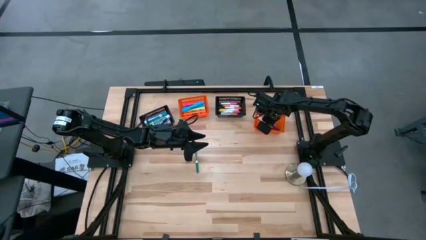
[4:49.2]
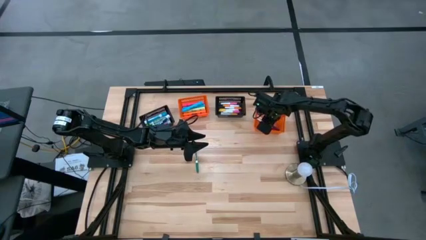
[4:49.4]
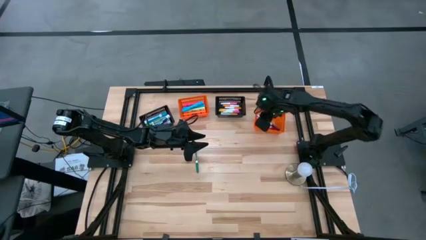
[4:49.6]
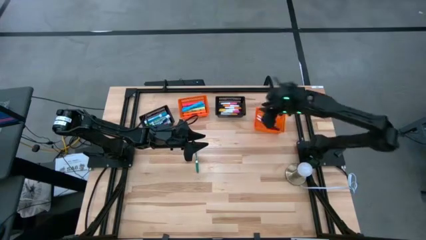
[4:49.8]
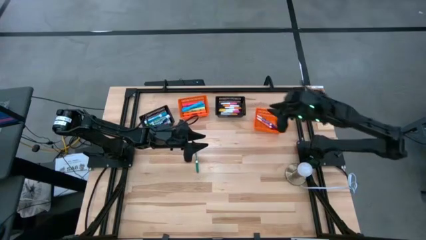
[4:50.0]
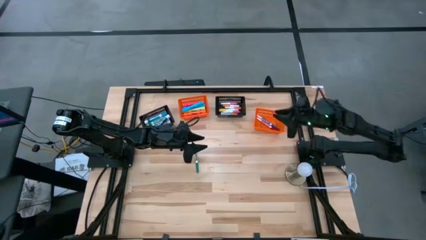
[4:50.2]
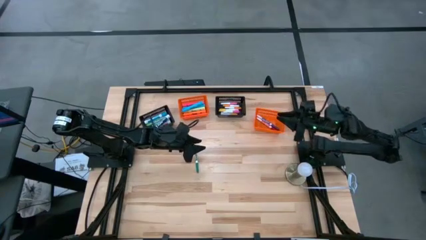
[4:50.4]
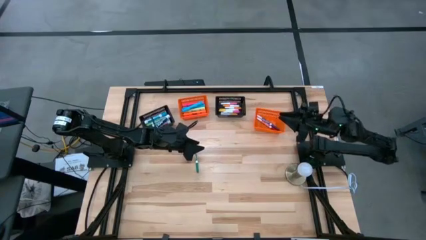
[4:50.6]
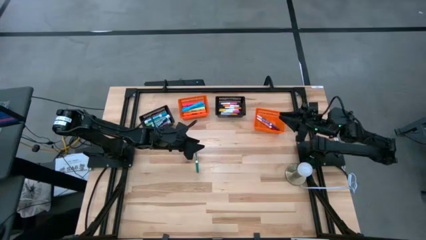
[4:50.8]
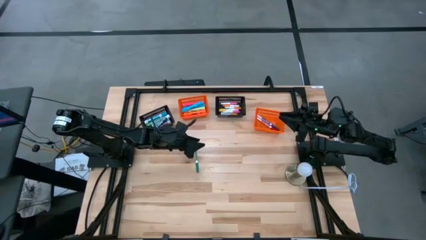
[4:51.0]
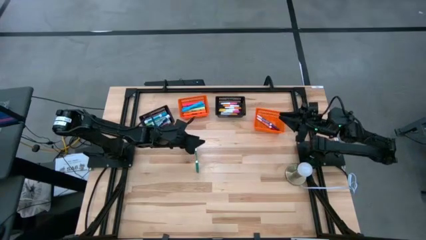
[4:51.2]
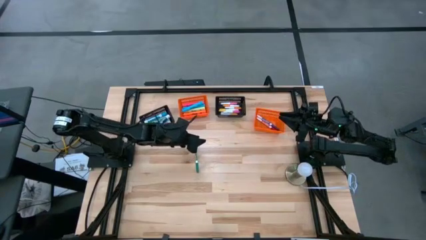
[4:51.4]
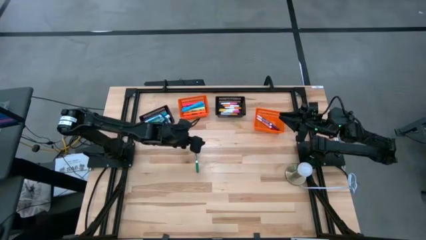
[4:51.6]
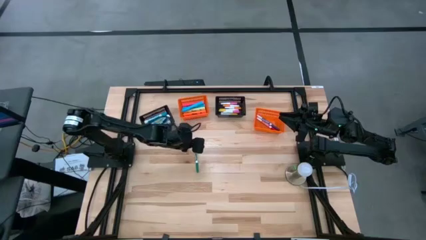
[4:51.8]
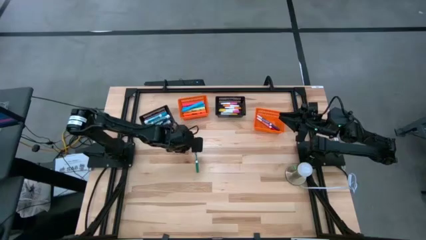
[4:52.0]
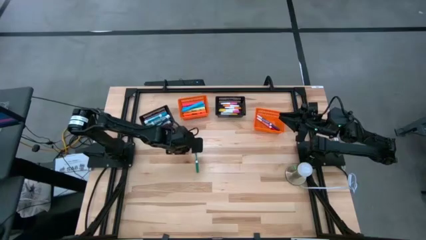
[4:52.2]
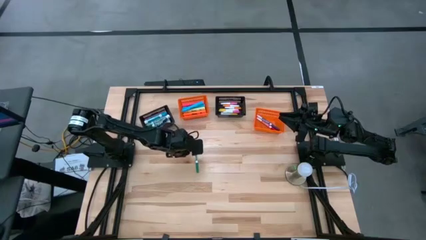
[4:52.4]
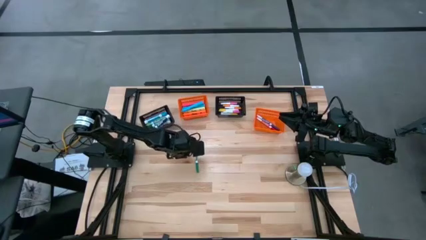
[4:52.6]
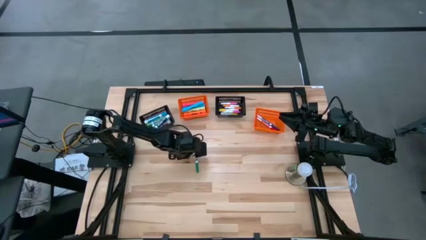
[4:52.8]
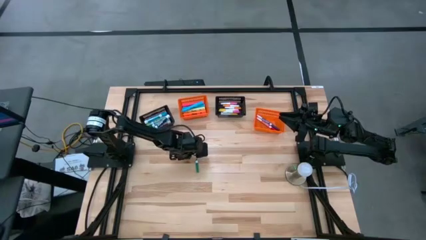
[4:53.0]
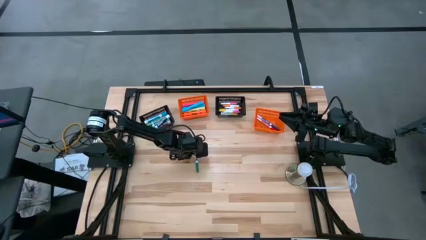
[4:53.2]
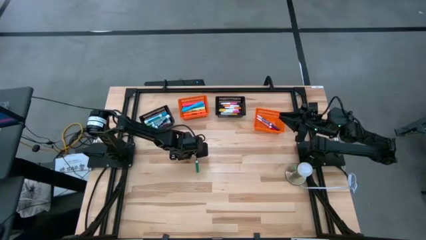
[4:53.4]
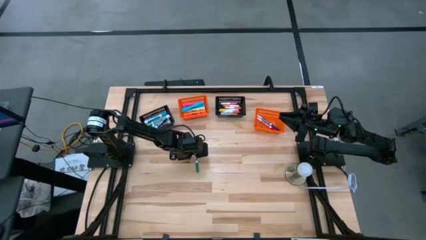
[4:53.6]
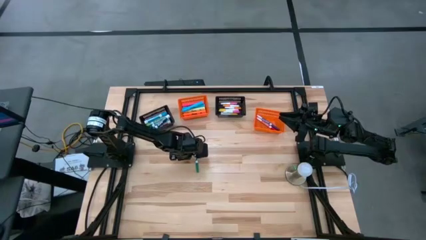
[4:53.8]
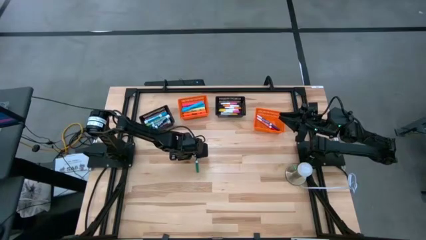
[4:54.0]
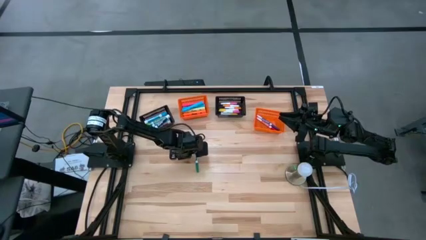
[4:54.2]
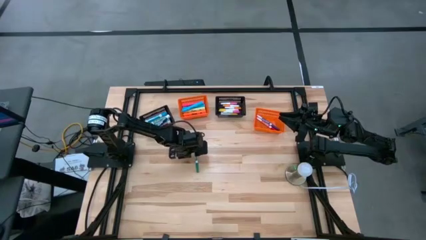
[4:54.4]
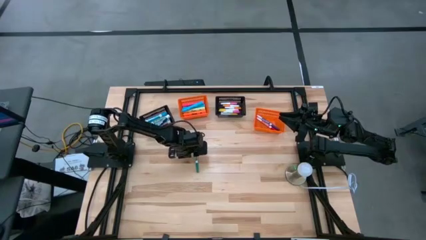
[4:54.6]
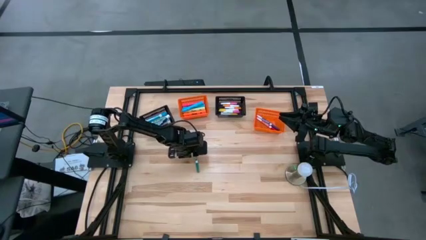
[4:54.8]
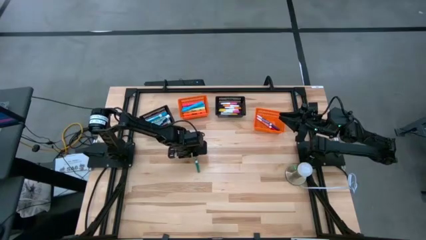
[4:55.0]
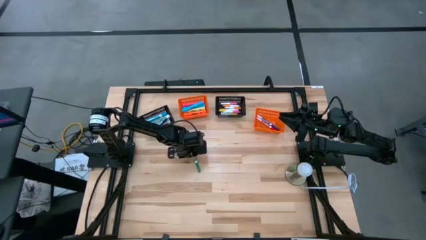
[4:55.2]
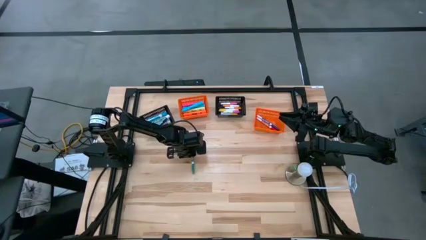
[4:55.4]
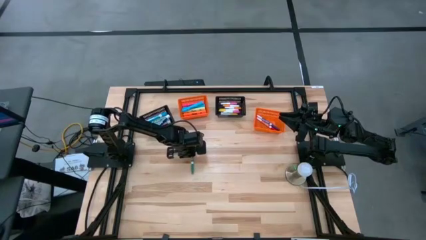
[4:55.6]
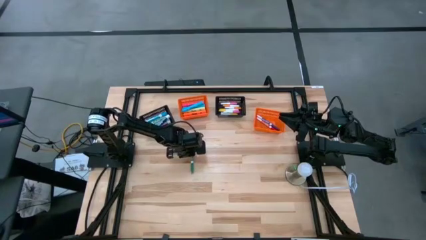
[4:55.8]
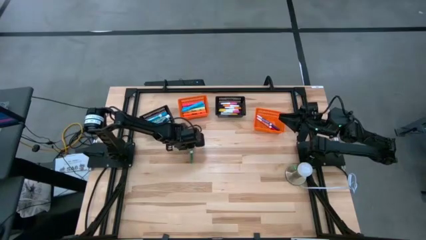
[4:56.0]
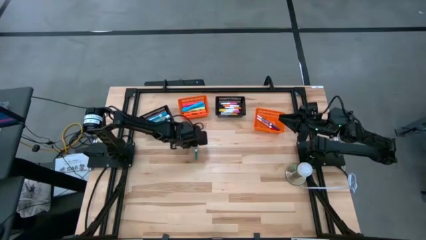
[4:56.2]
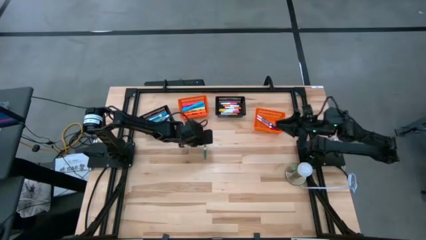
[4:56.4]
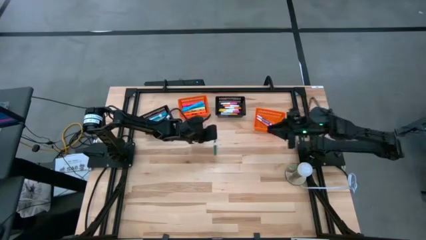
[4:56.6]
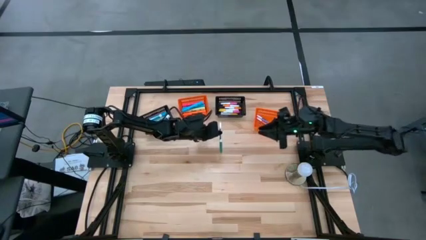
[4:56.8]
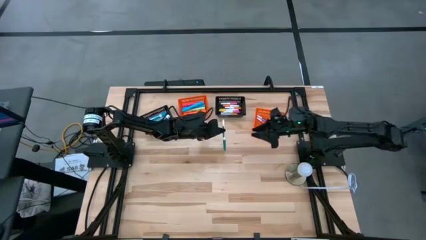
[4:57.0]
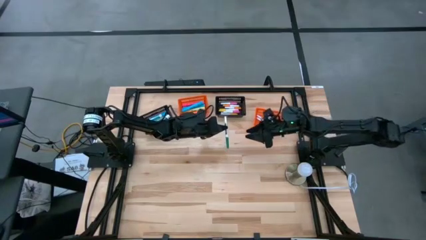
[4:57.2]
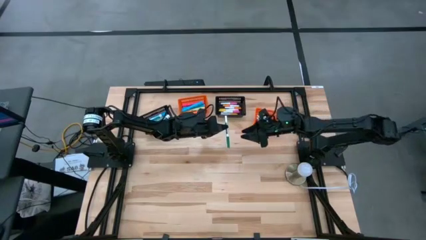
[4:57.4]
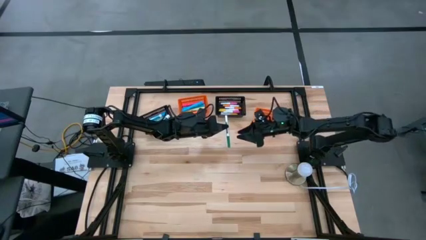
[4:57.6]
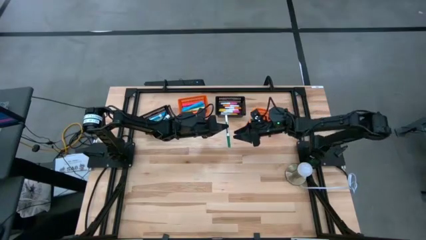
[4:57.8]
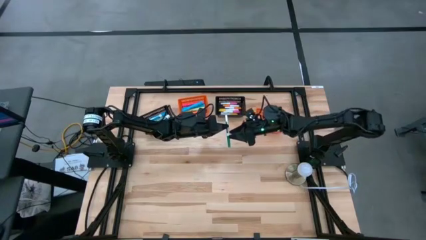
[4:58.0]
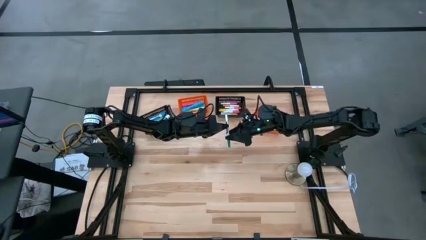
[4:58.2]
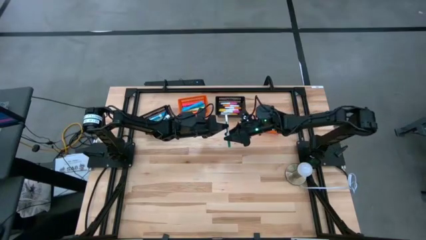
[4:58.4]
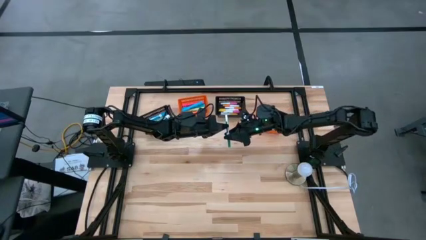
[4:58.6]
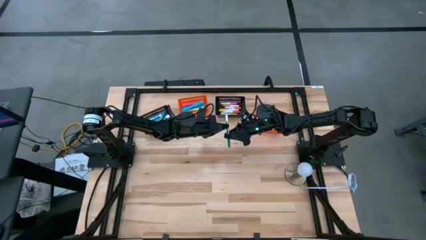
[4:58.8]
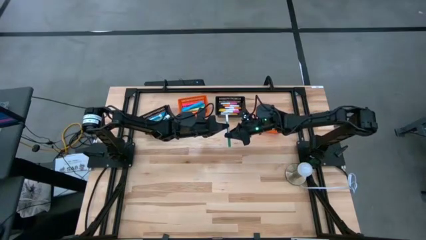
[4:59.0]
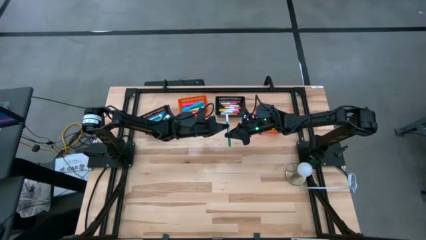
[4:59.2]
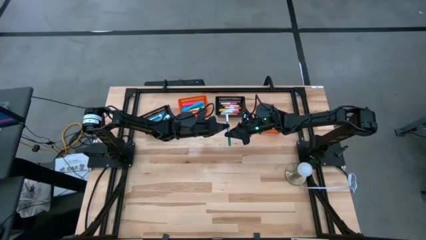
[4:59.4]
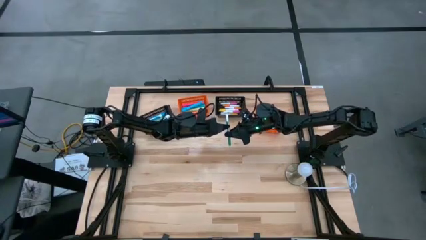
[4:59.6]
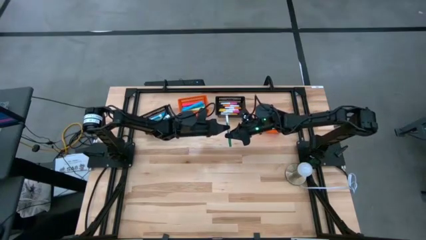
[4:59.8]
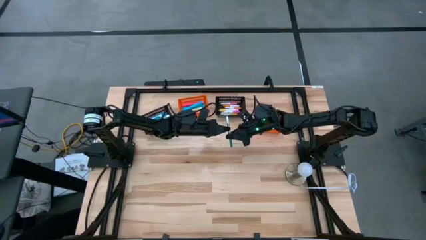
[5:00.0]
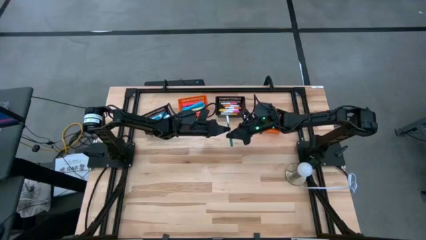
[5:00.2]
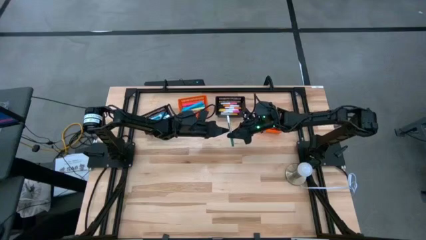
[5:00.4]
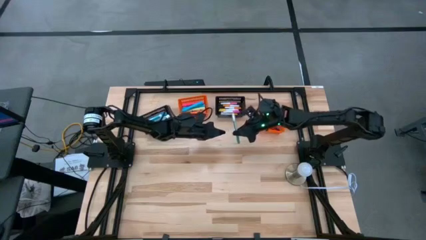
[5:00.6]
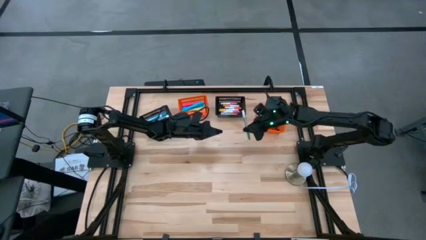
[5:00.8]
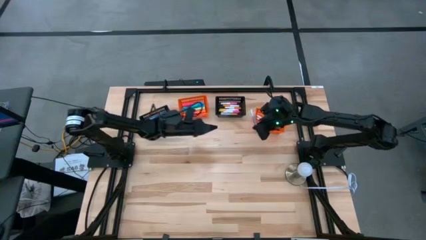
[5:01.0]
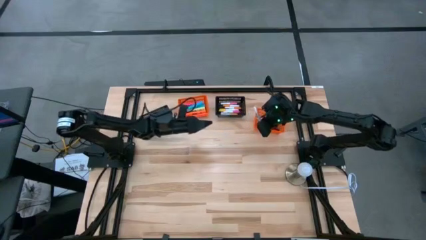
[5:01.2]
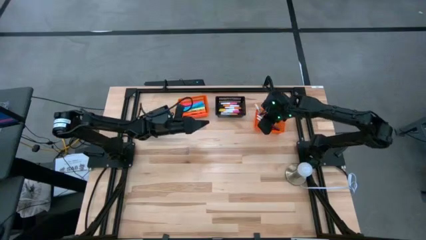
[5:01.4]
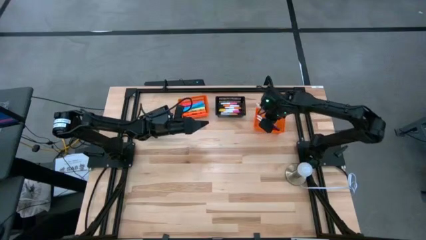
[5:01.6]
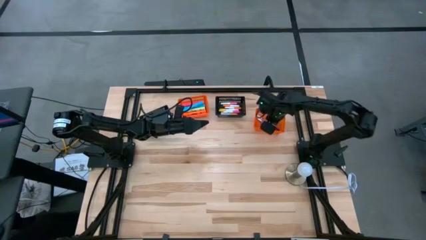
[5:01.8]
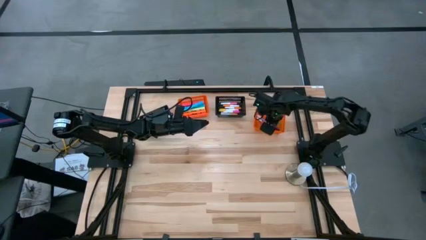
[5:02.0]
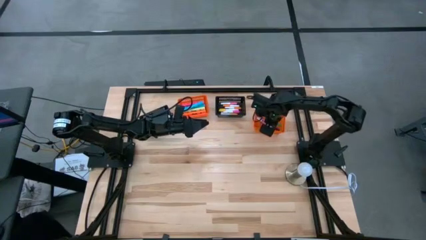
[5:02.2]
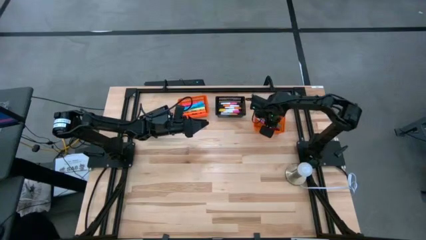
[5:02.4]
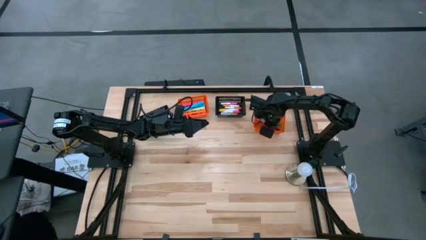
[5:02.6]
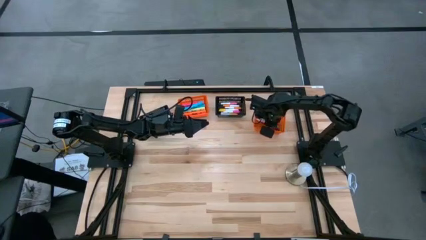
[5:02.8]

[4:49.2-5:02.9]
Task: Pick & Place Markers
Put the small green marker pen into the right orange bin

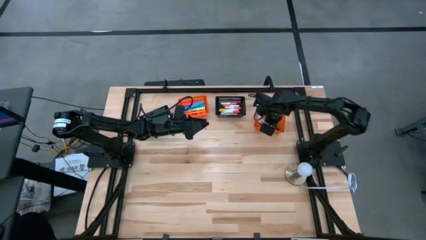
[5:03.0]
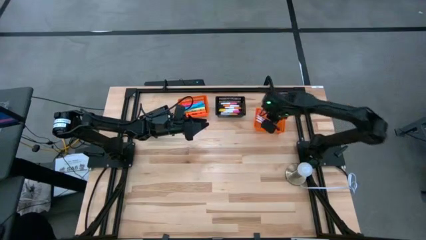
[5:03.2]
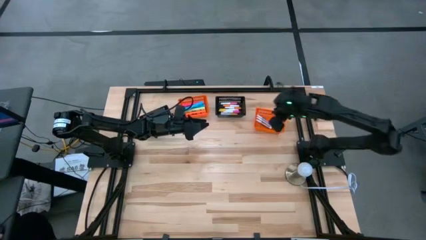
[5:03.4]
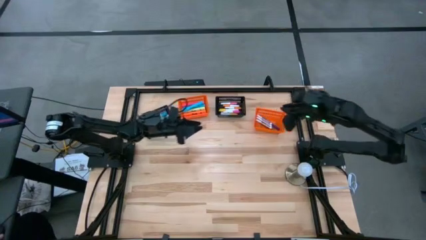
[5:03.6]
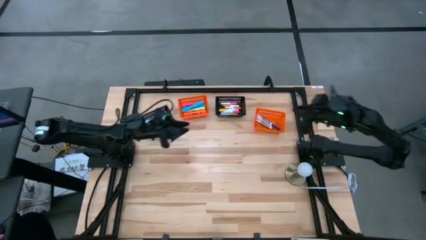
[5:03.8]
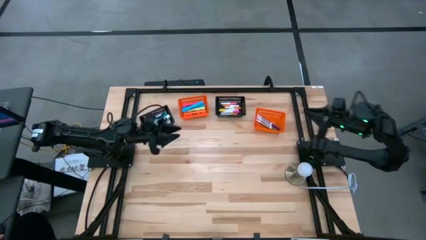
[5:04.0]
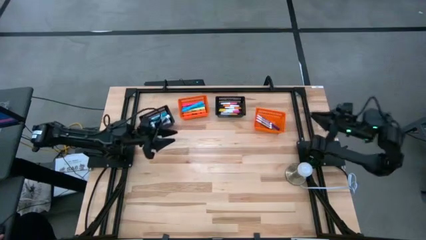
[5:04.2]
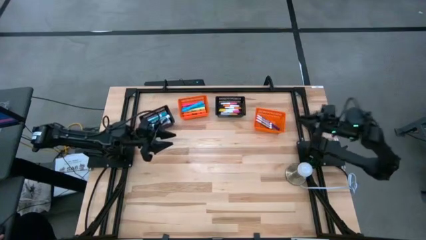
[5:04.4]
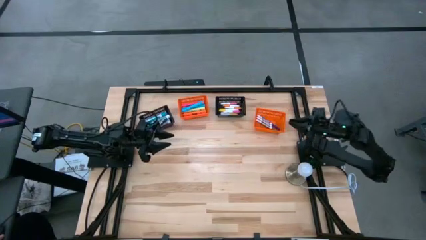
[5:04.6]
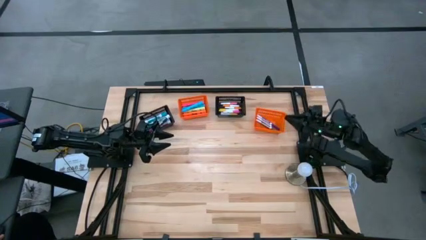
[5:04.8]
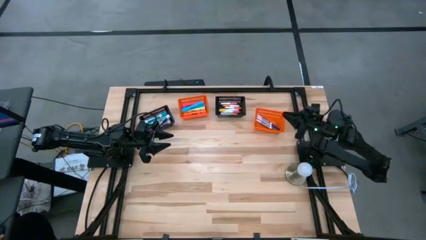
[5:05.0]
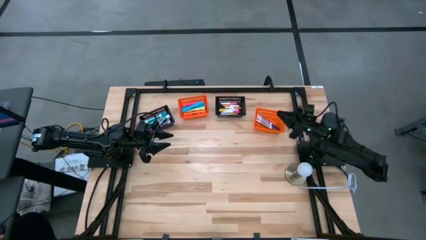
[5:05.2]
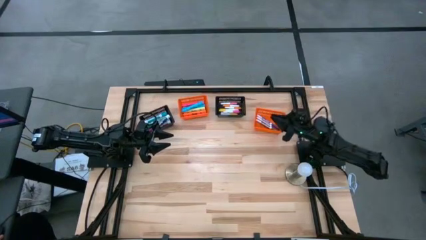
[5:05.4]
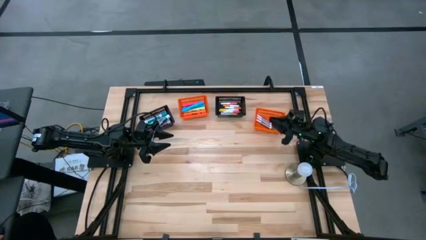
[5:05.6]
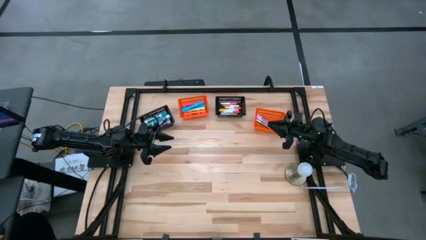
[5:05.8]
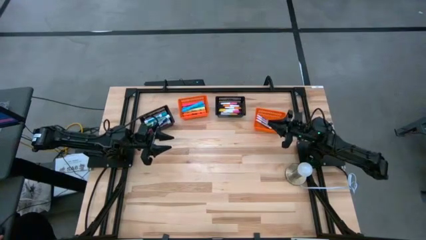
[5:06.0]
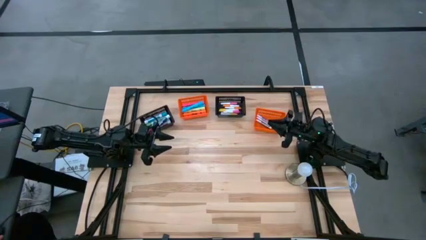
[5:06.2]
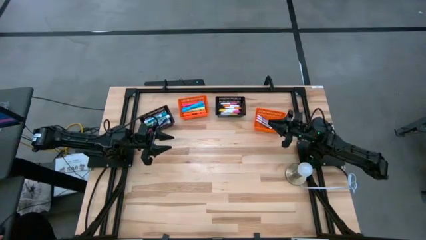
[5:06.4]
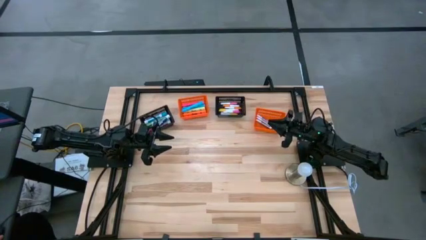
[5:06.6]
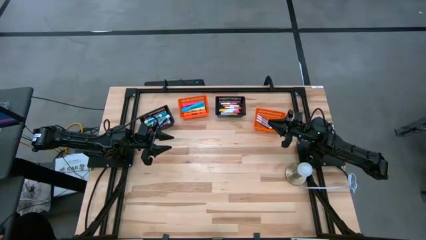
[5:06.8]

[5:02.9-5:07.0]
Return to Home Position
